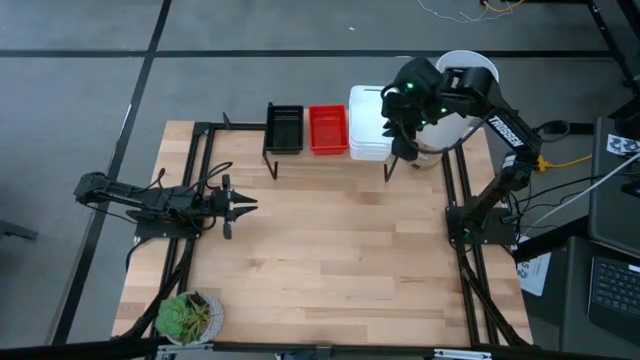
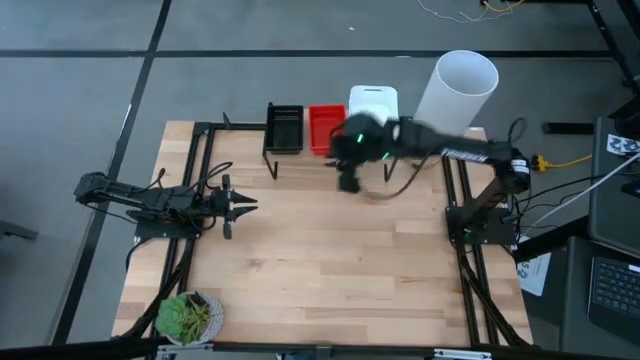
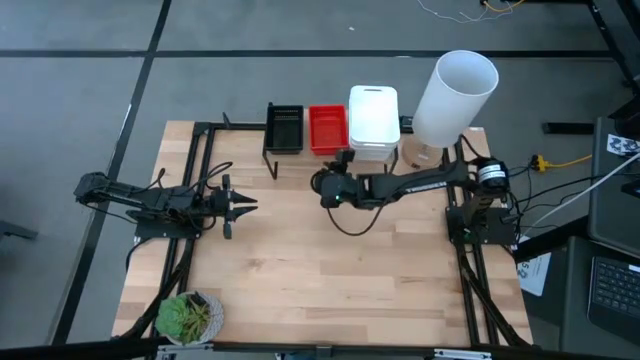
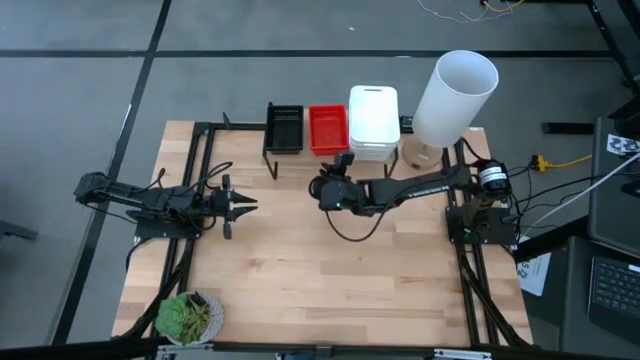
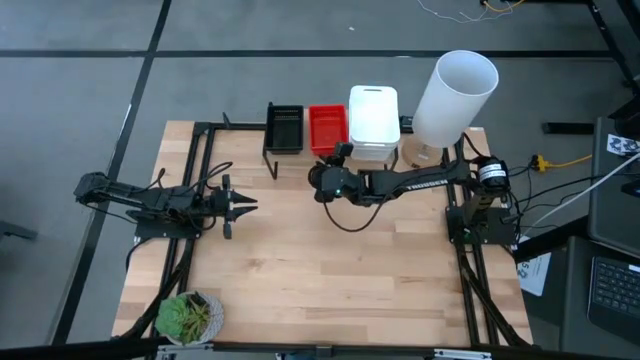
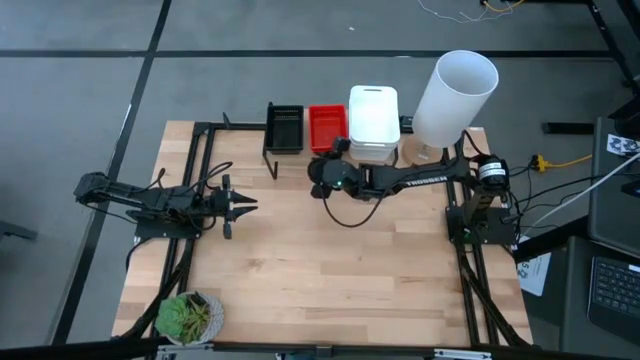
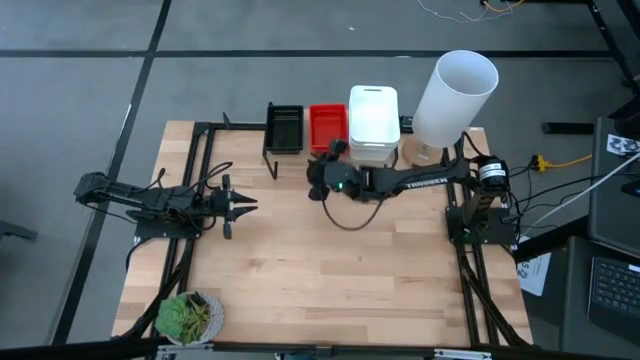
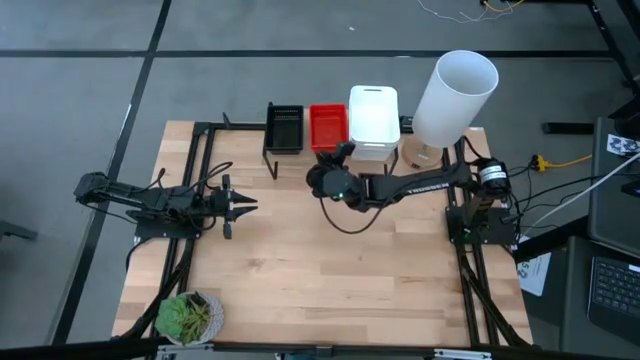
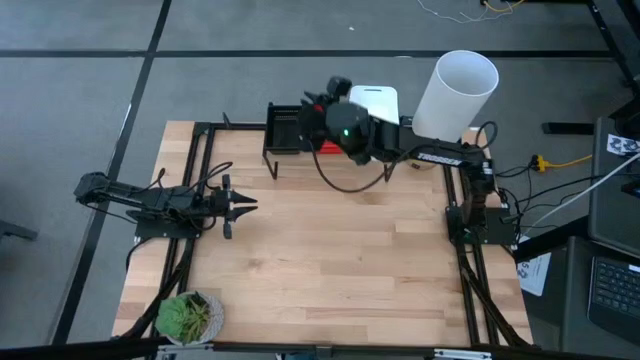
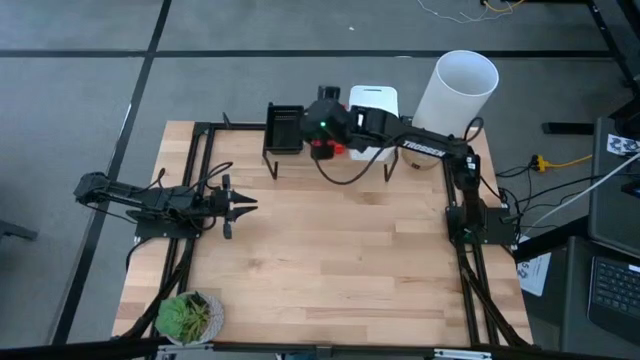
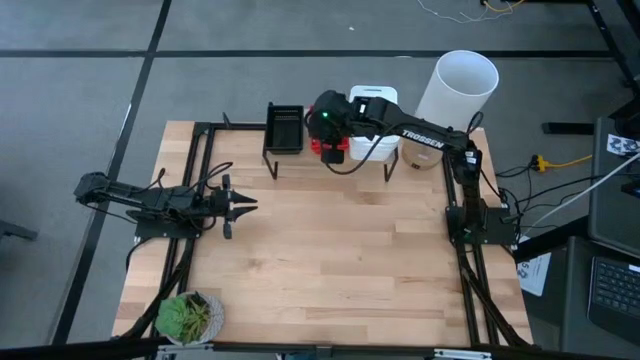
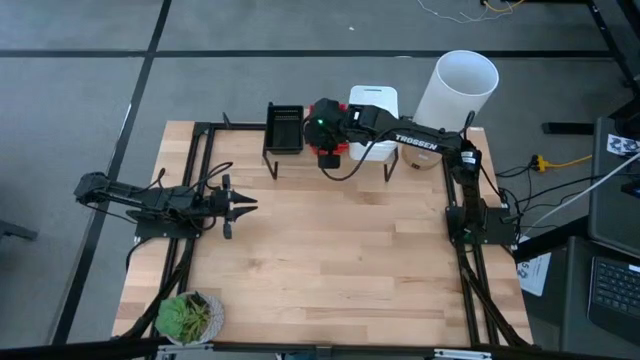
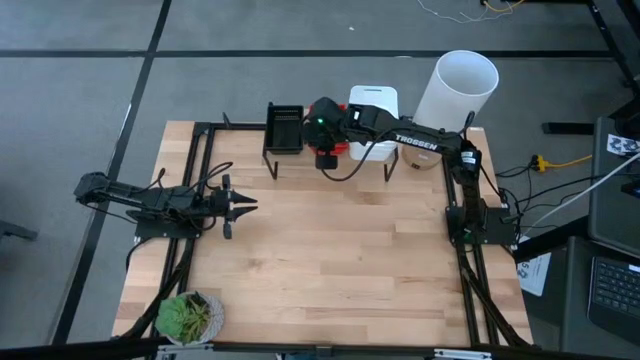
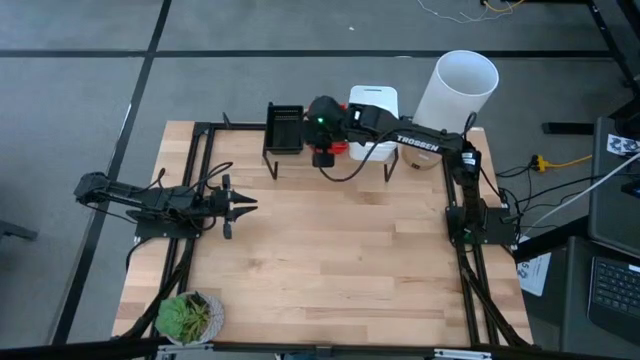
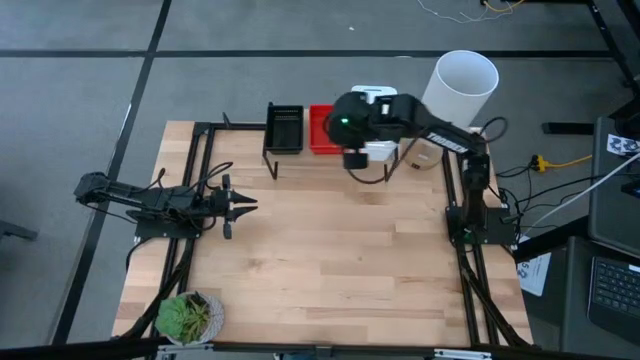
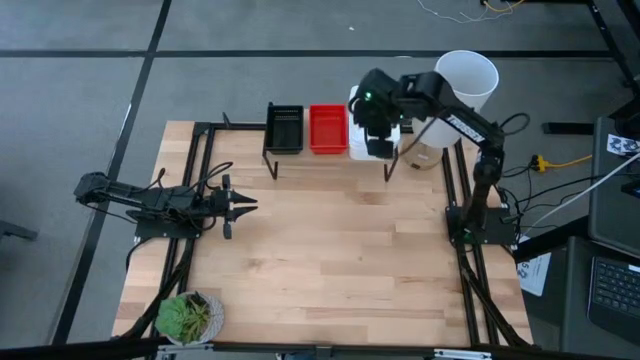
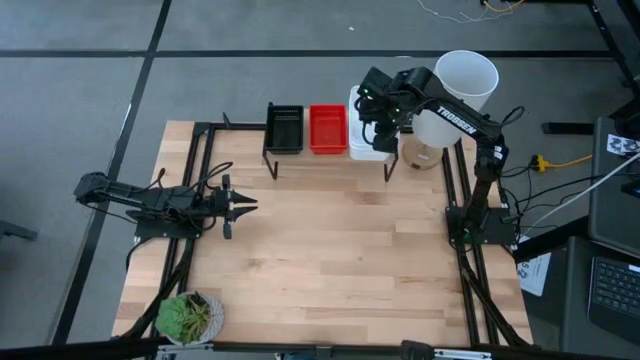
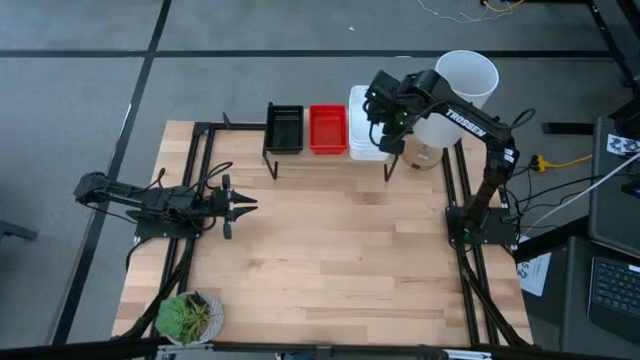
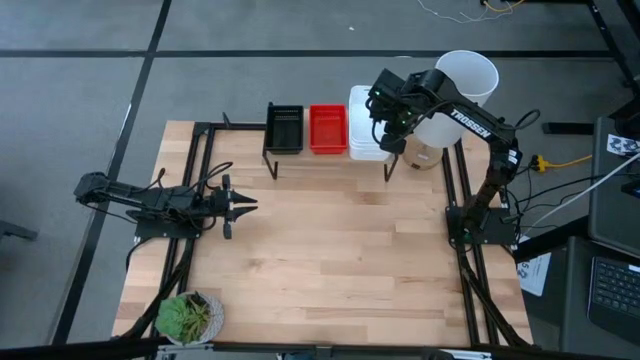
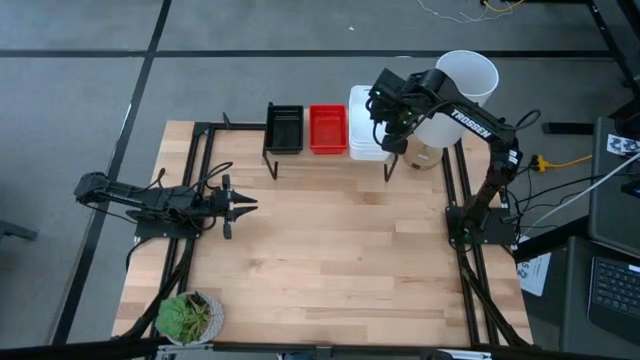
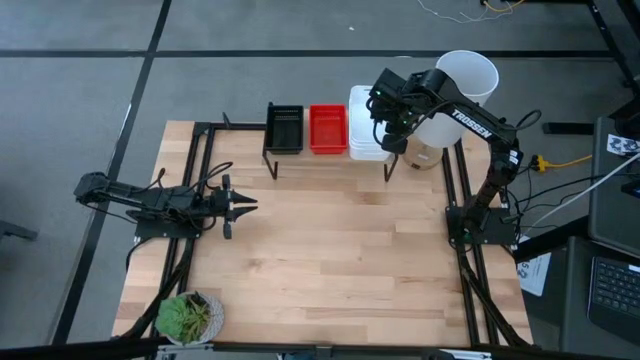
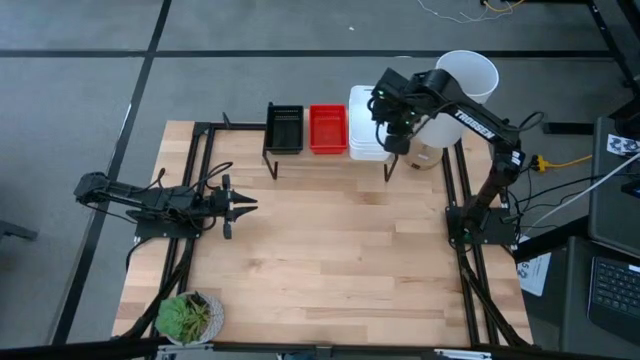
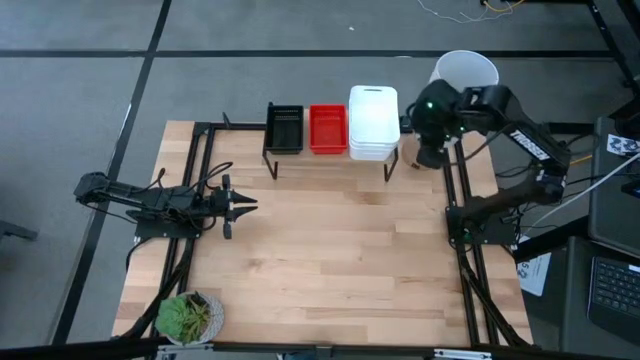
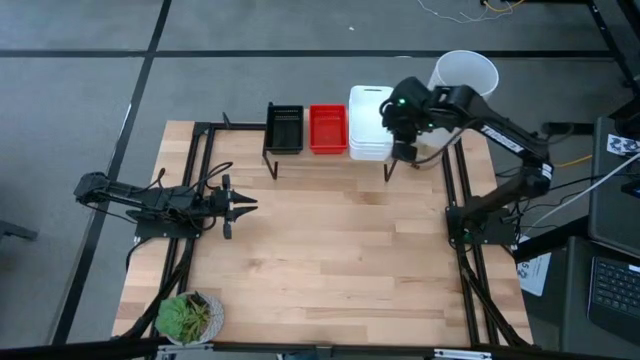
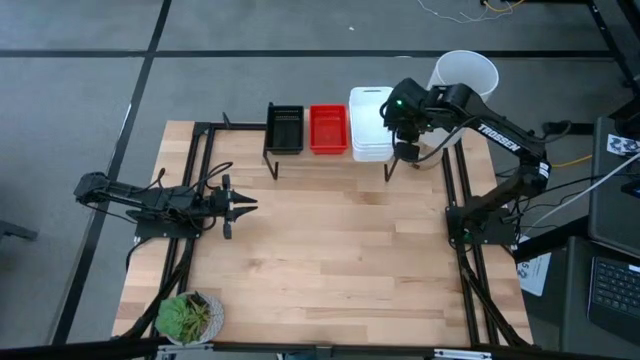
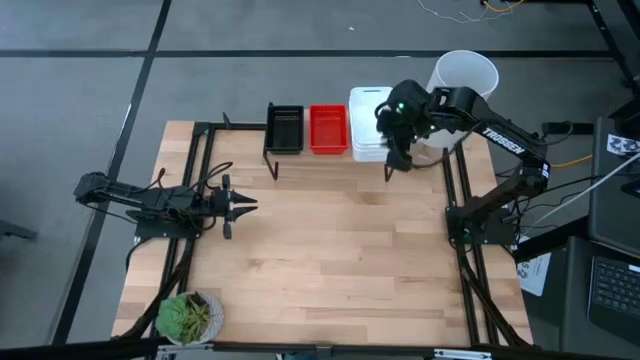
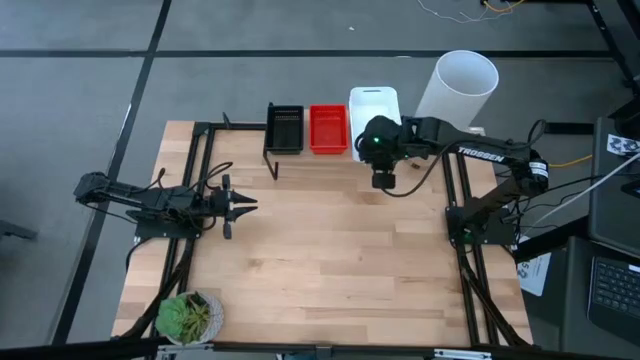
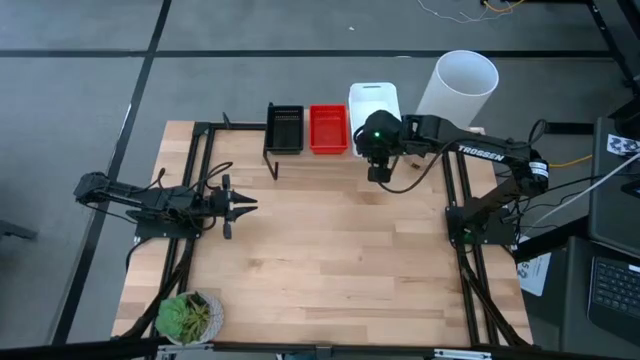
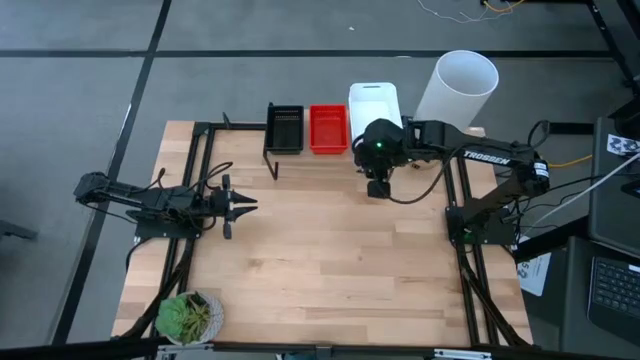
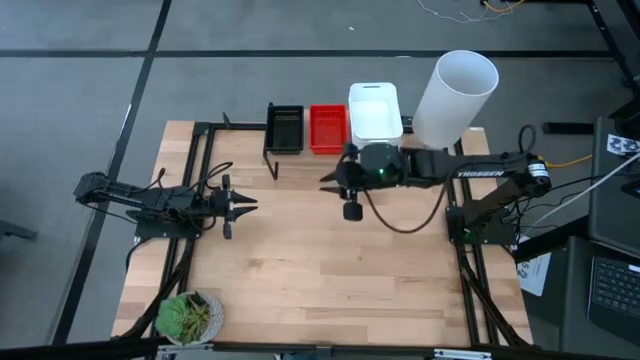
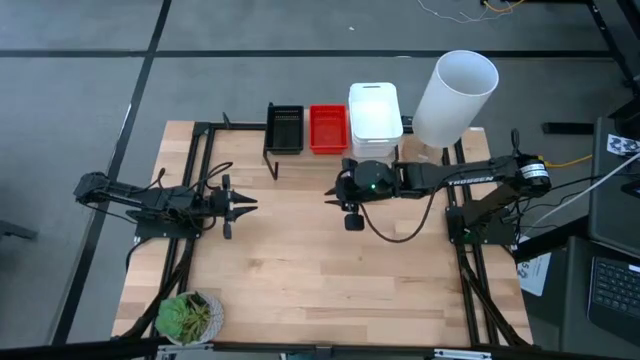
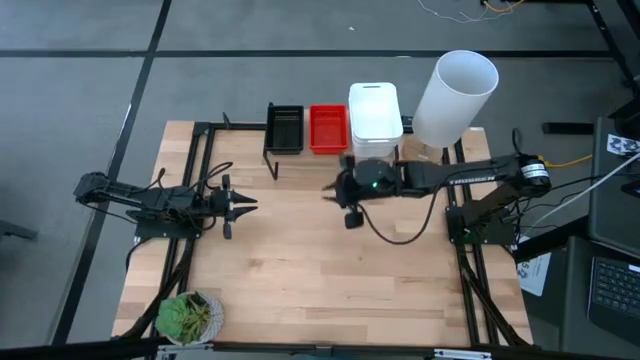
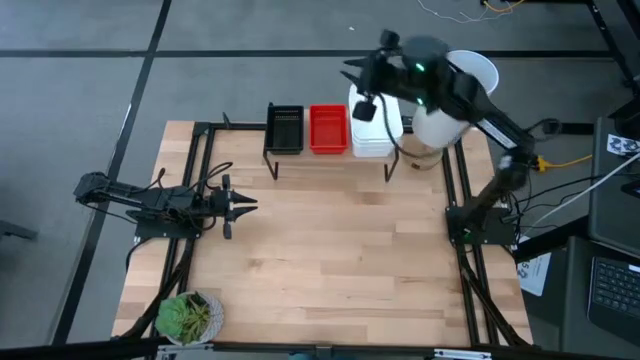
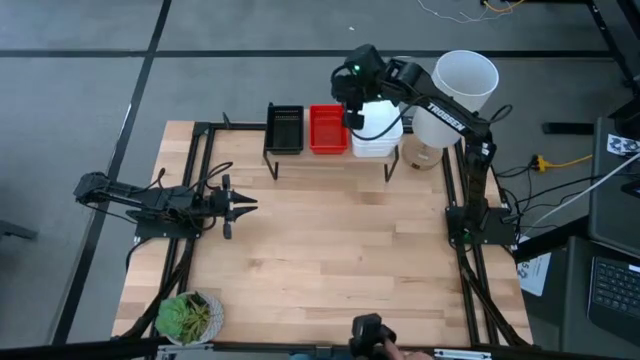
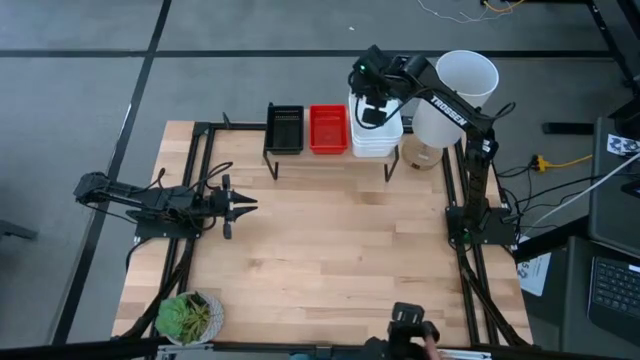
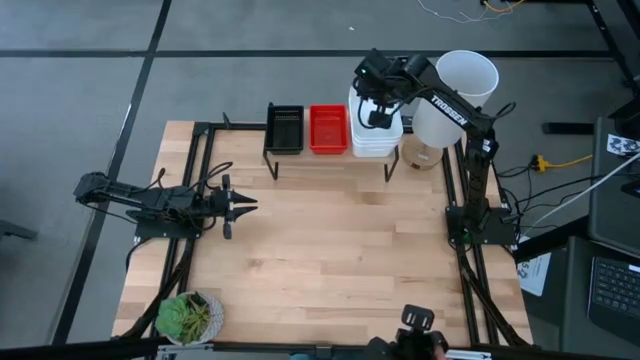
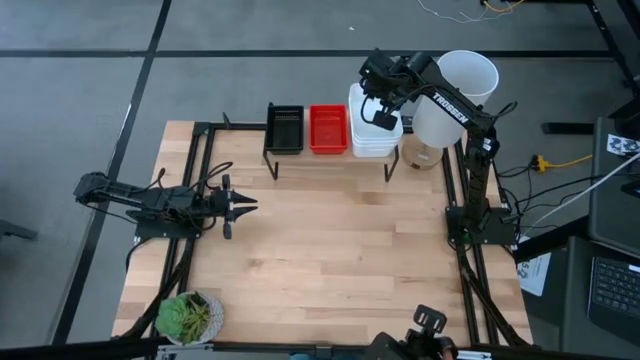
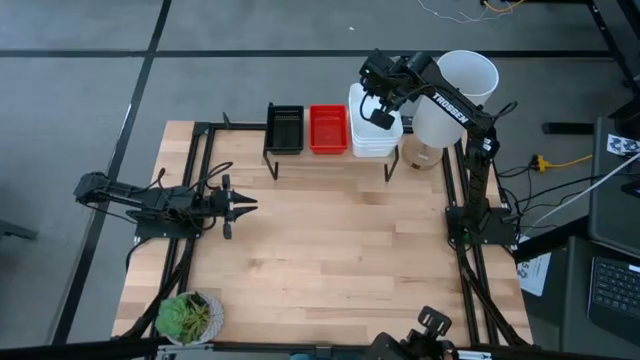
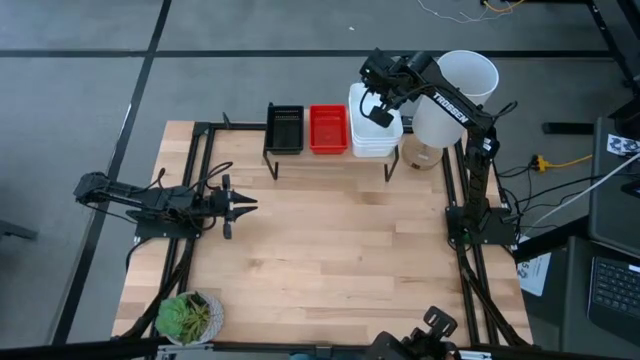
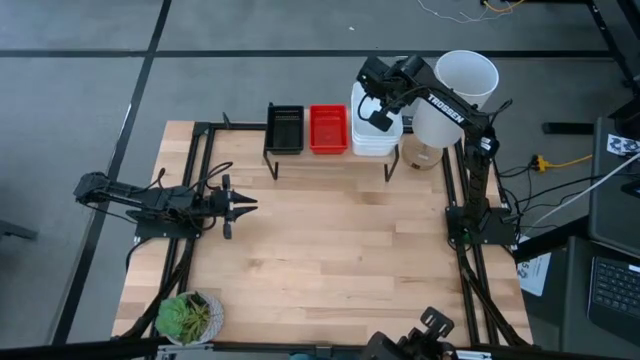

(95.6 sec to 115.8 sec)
Task: Stack baskets on shelf by color
Adjust the stacked bins on the shelf

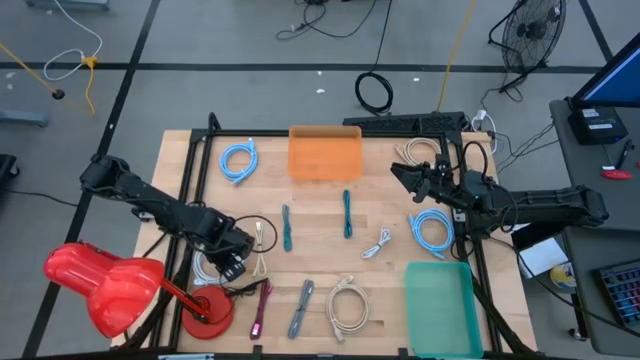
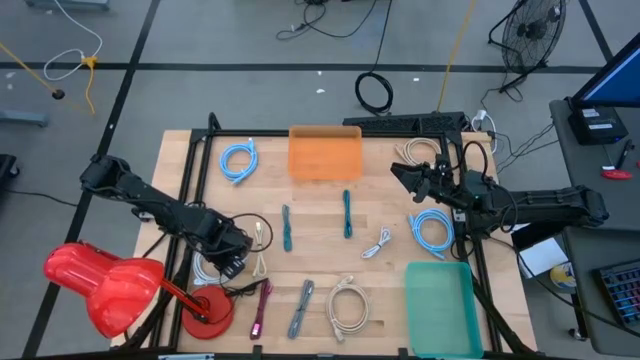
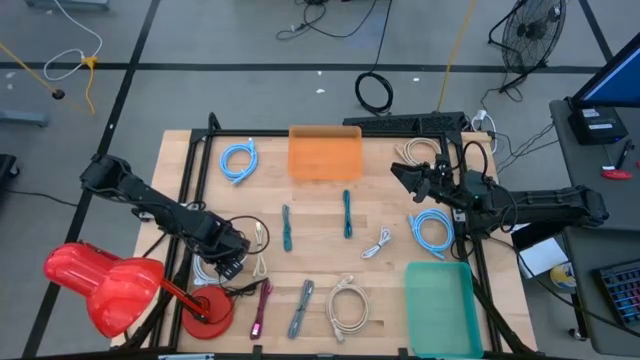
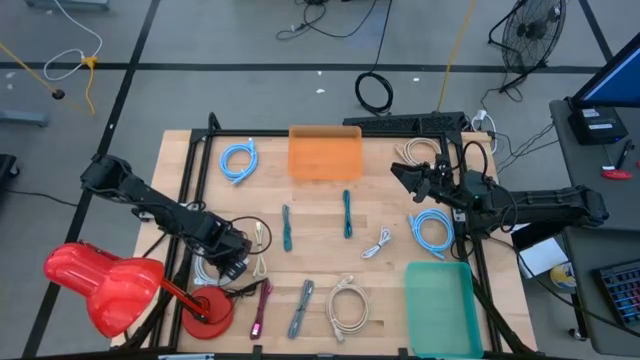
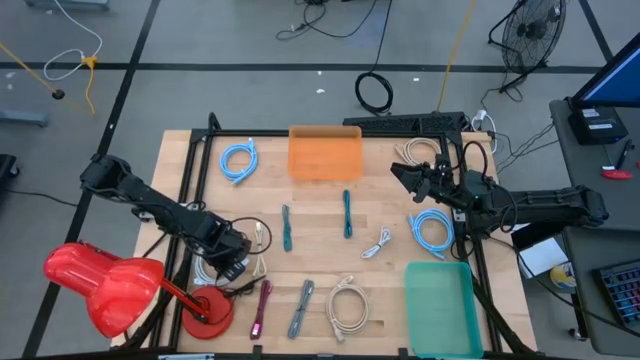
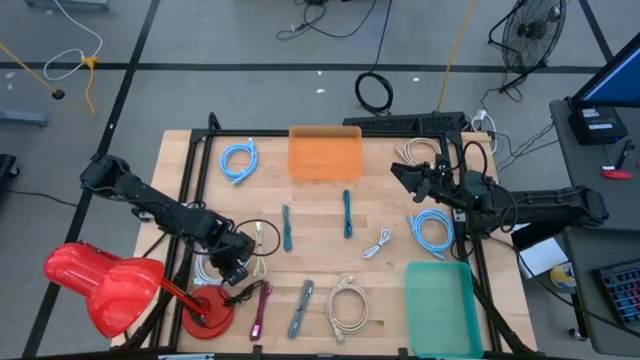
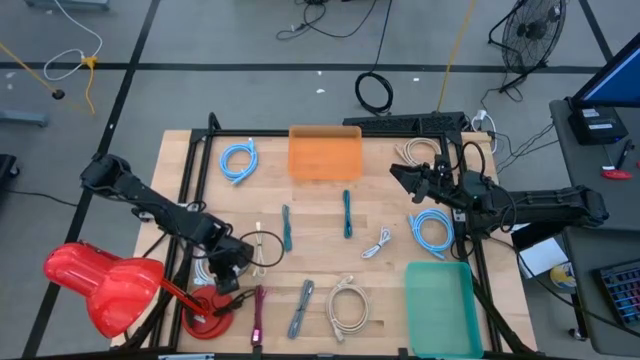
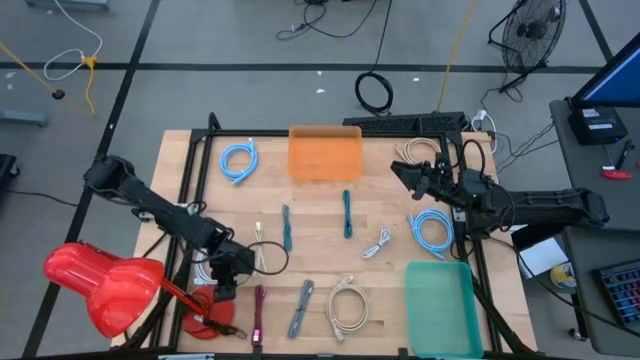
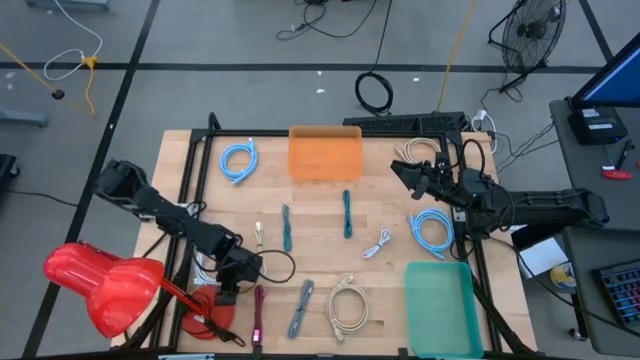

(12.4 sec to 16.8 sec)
Task: Pick & Place USB Port
Adjust the black desk lamp wire
